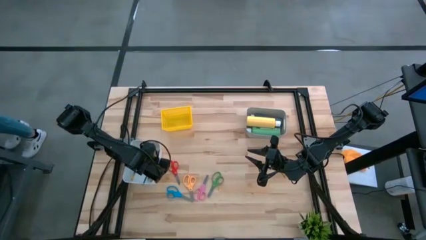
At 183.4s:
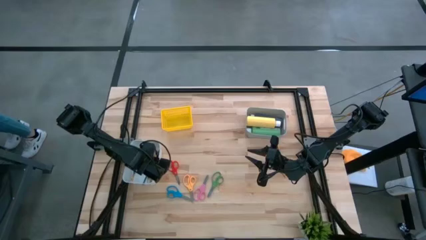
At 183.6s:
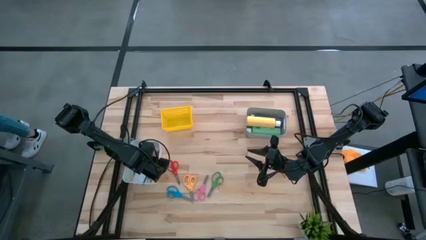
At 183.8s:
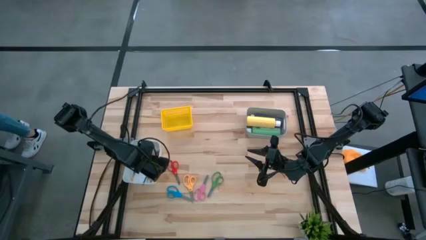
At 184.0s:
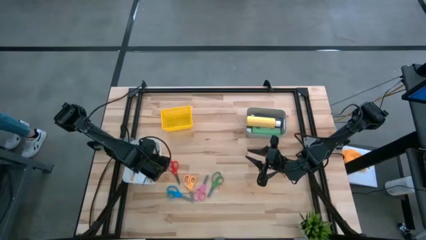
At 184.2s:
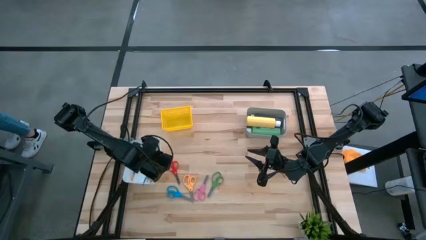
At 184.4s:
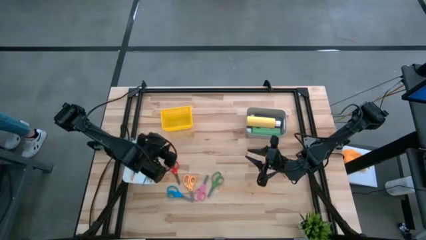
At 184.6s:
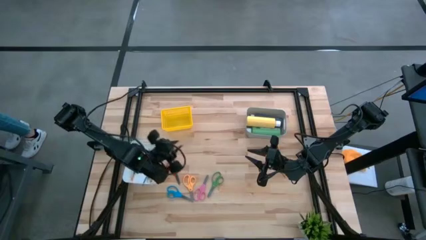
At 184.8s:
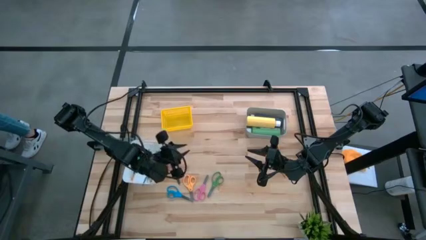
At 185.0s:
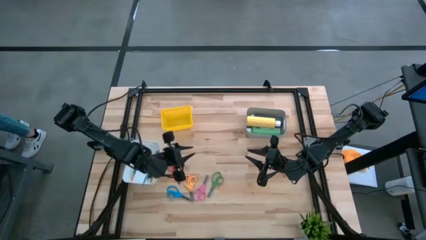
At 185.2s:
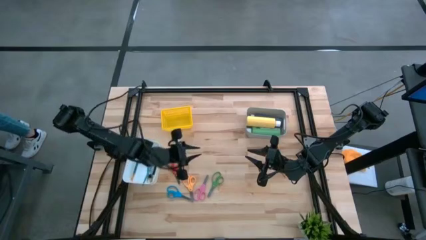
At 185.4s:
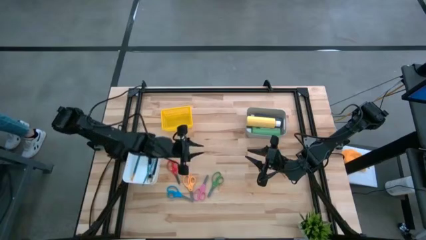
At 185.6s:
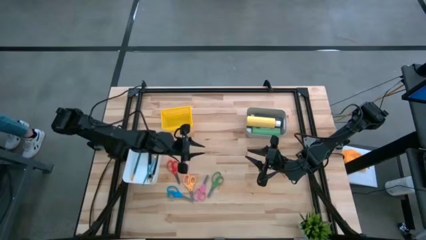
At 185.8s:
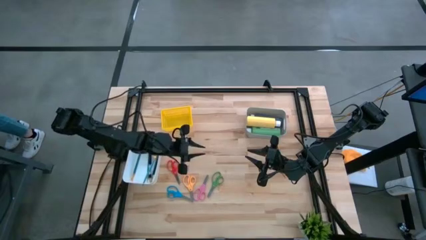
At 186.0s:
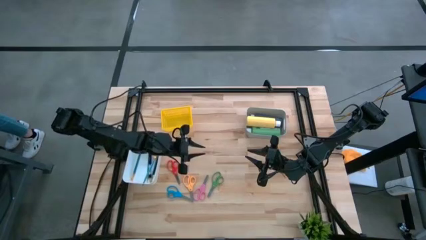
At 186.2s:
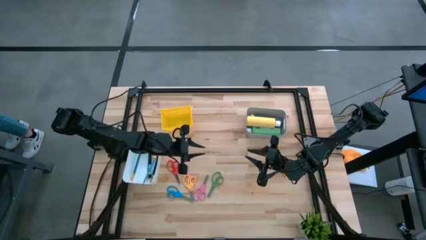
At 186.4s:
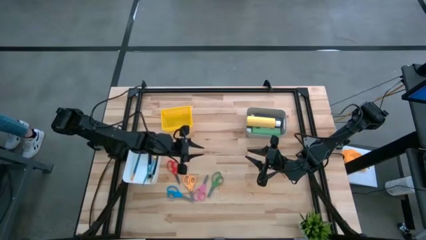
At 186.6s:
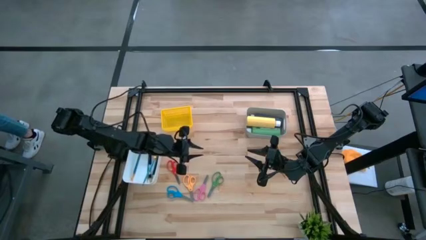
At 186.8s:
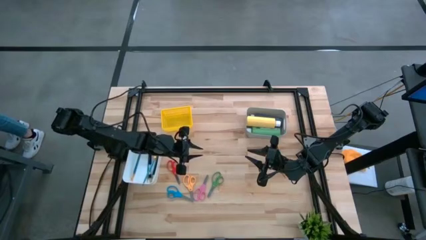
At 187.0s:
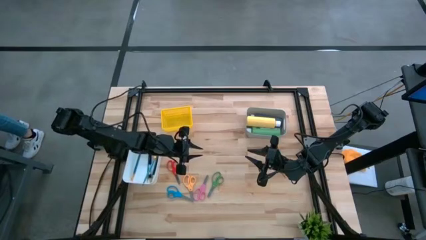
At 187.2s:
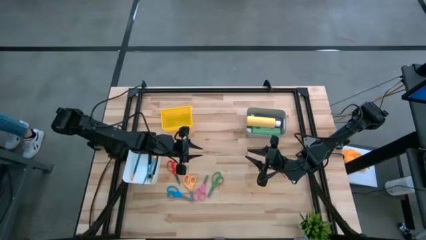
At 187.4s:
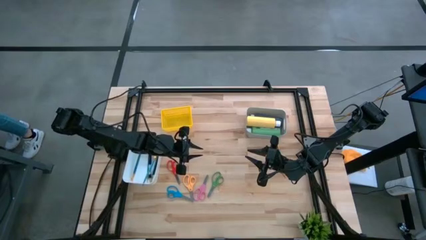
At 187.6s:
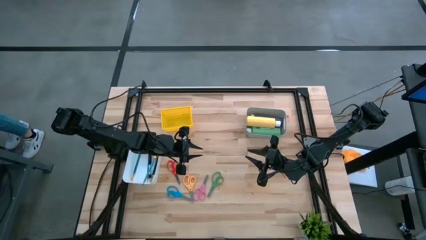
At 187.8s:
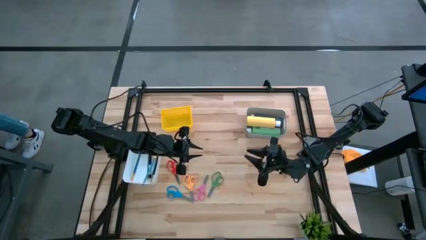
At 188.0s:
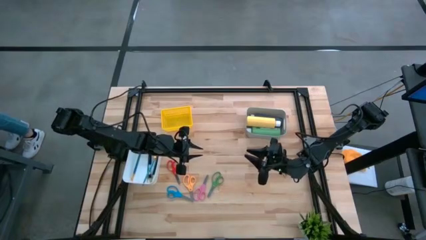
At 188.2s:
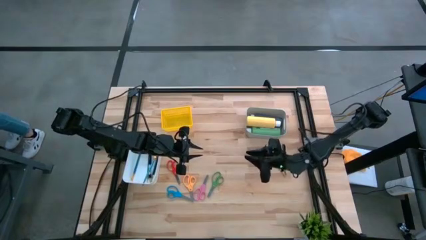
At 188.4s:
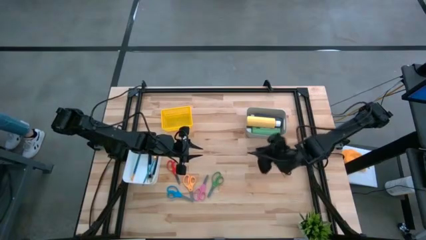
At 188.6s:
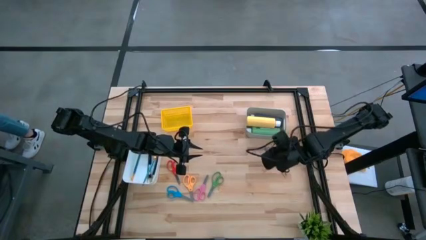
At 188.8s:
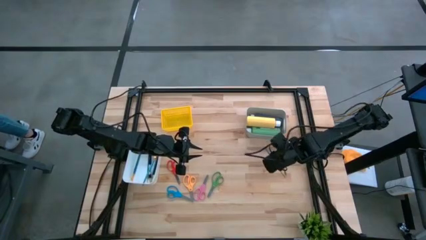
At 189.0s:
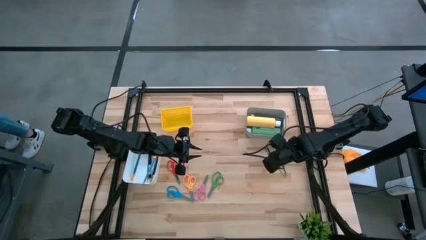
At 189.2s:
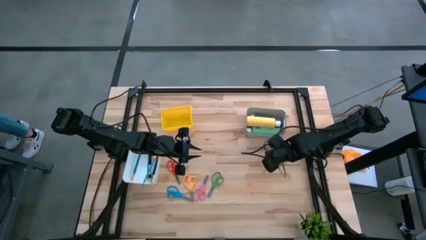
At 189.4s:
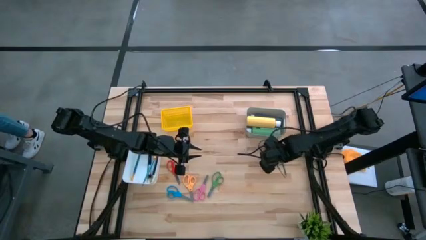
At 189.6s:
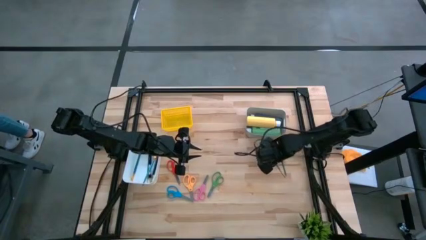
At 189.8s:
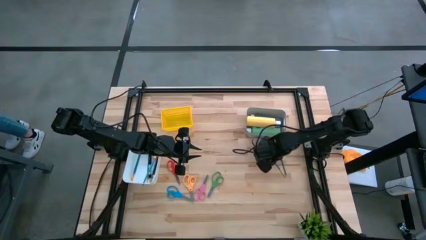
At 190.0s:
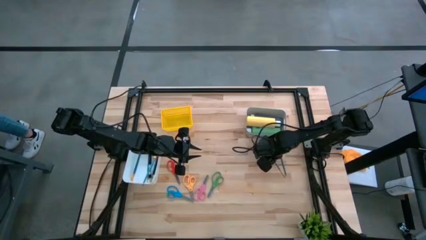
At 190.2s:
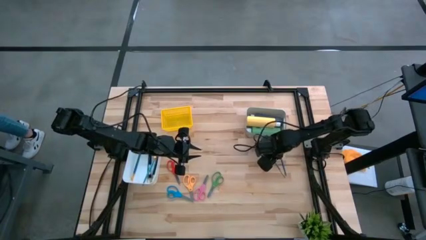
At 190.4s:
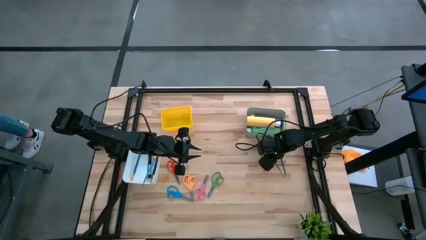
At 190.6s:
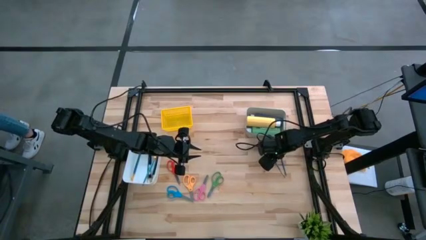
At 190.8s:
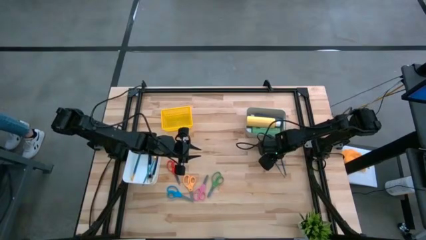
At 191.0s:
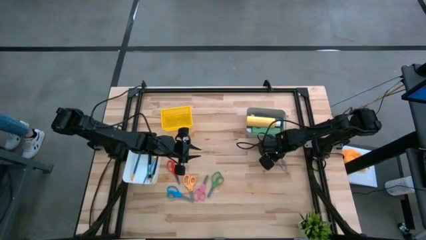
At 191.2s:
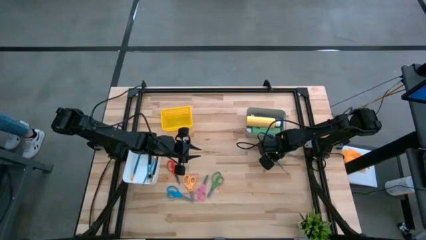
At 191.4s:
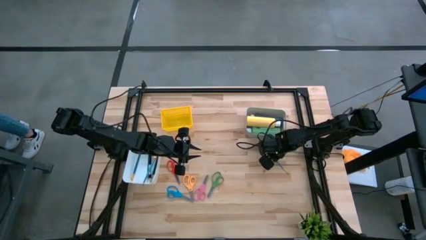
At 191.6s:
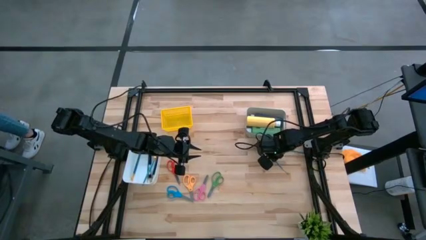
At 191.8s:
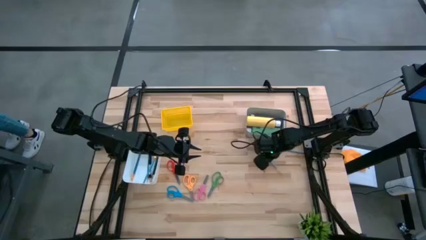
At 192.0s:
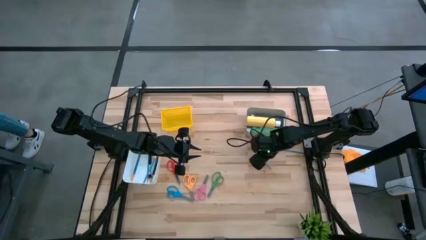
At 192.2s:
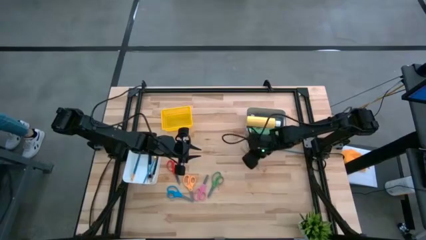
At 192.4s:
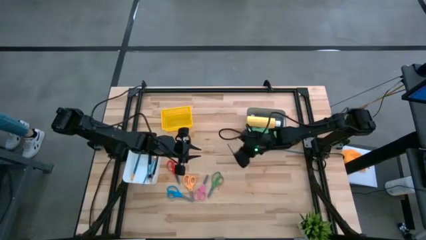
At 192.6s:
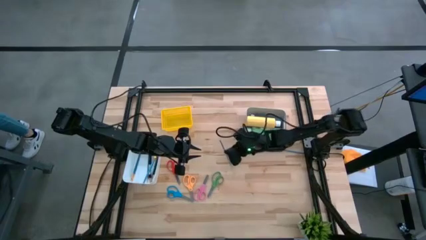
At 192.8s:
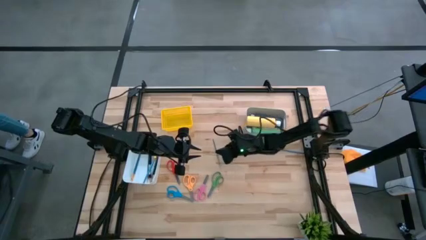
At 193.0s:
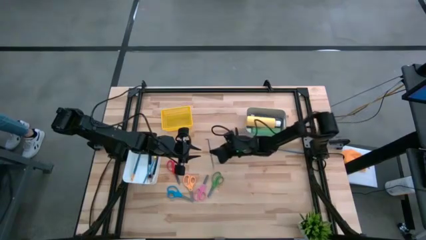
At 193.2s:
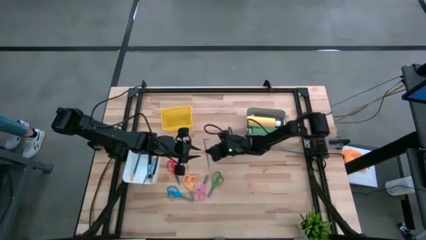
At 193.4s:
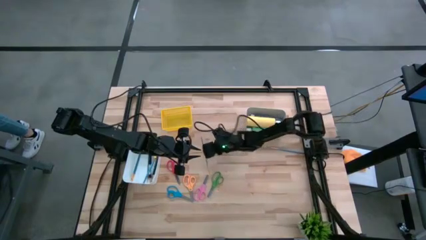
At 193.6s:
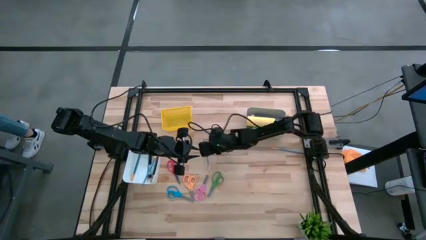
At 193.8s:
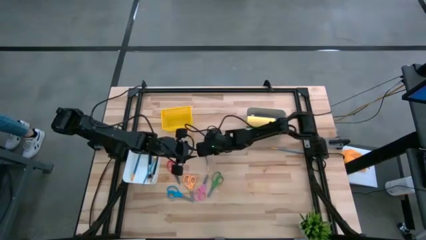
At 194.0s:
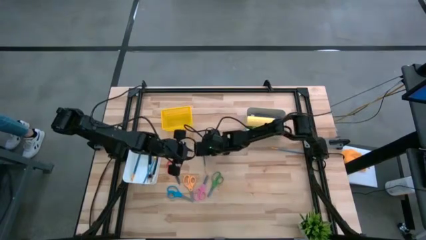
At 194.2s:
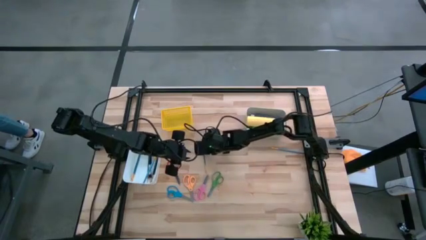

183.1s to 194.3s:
Task: Pick & Place Paint Supplies
Put the blue paintbrush into the white bin

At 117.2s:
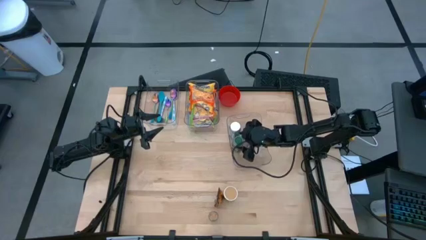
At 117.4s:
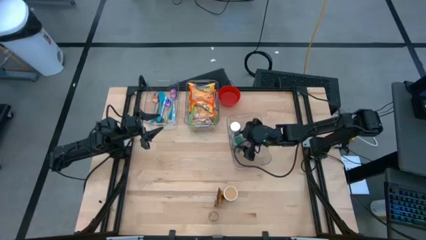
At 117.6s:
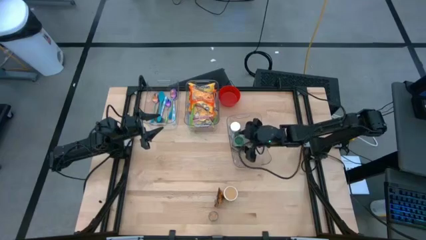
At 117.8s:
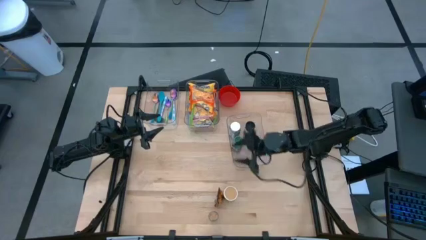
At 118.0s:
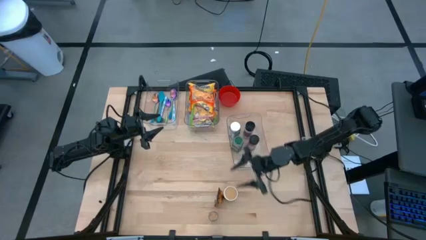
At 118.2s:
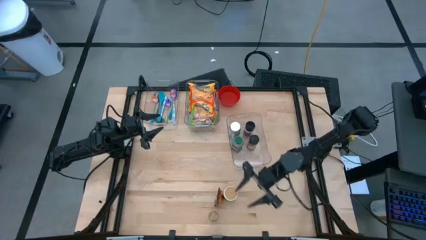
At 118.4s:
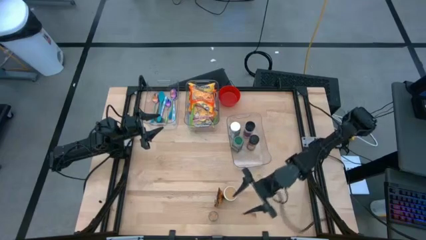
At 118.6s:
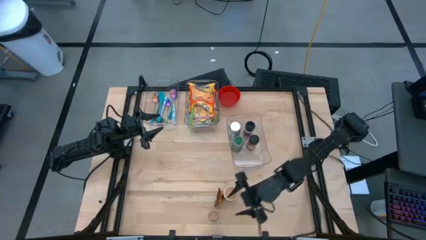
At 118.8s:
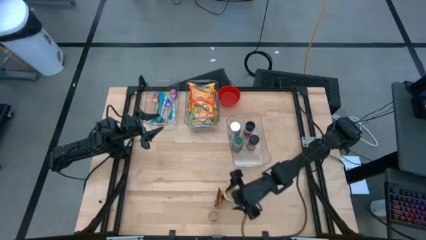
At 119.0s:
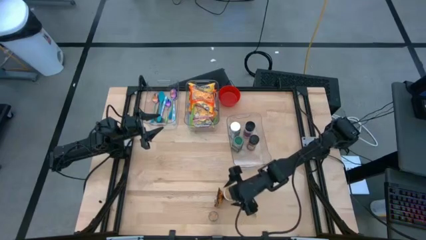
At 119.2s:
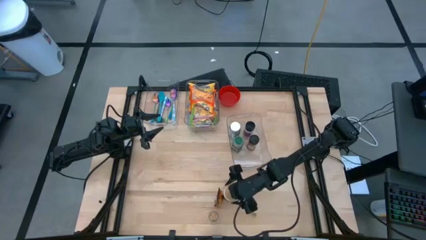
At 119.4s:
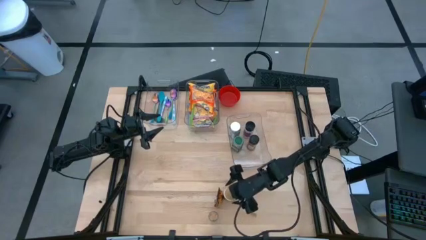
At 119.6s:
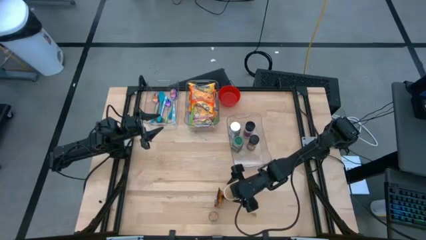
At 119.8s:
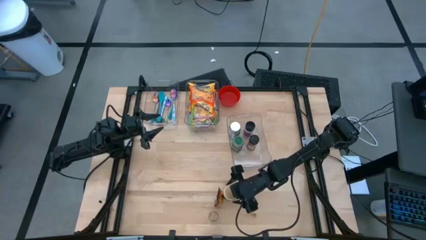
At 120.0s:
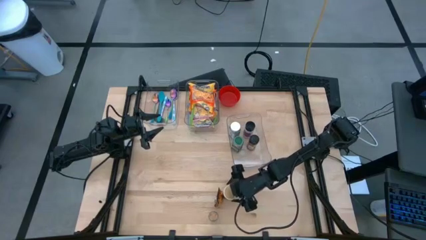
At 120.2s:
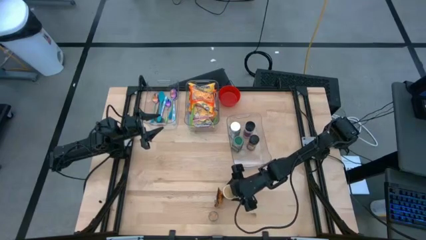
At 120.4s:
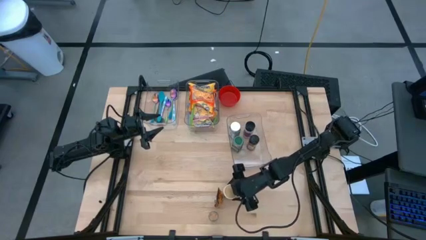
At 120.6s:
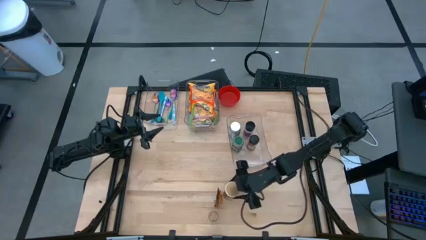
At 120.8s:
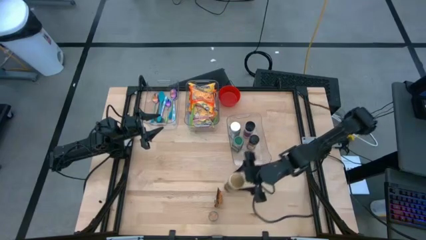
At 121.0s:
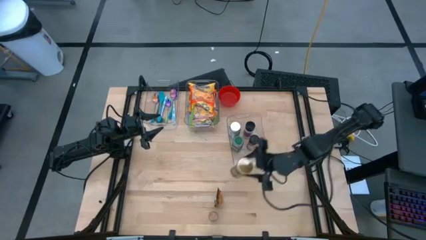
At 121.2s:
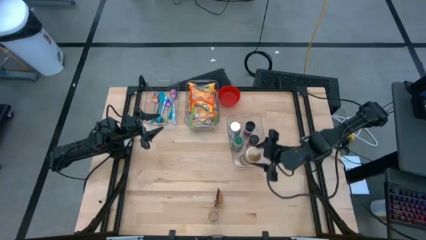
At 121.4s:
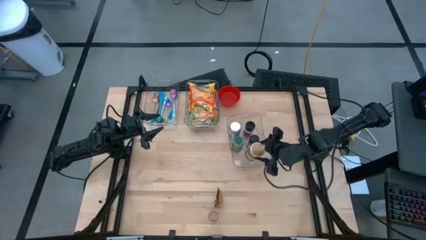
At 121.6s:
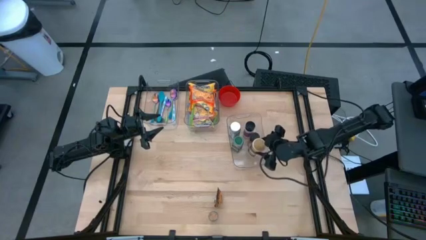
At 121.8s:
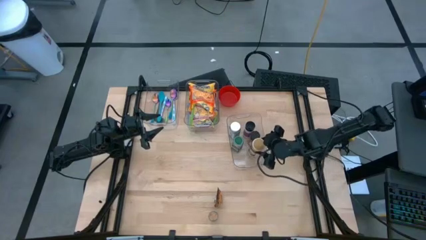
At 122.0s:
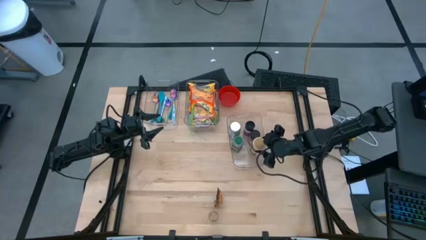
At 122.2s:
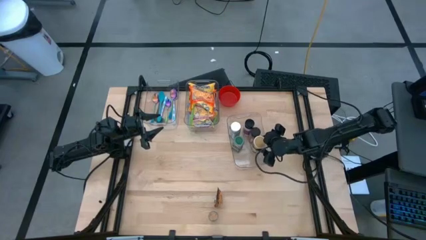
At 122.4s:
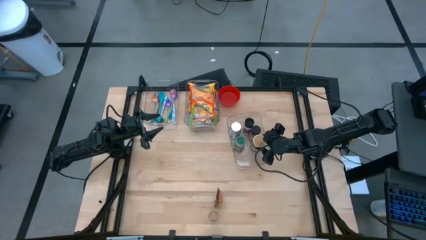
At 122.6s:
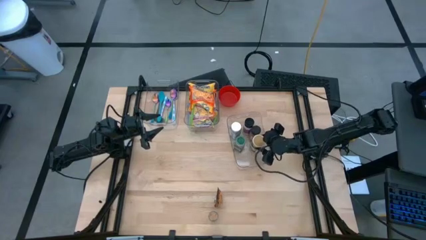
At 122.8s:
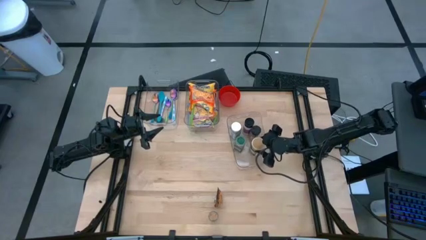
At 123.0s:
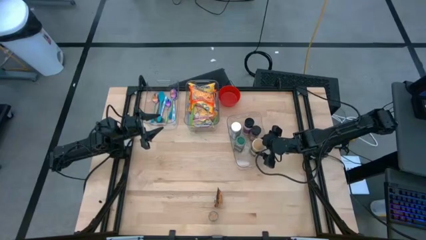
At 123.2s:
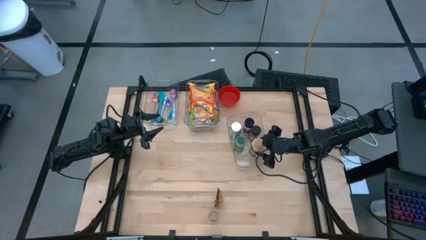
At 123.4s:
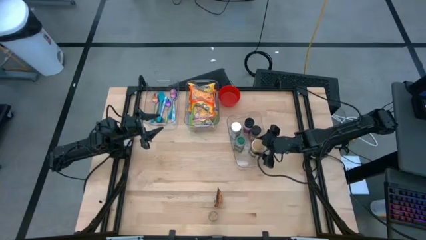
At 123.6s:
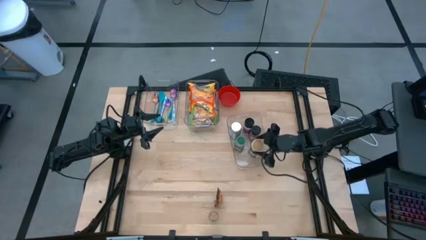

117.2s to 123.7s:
Task: Pick & Place Food Item
Put the gold seasoning bottle into the bottom right transparent bin
